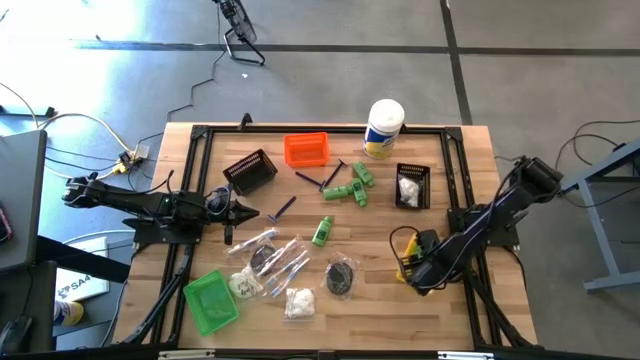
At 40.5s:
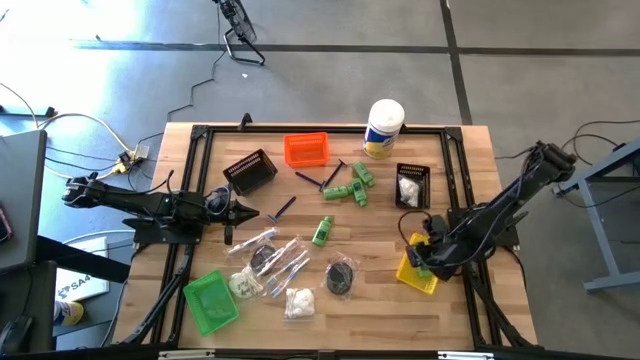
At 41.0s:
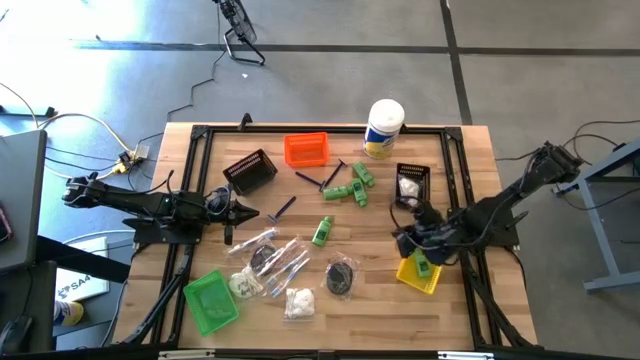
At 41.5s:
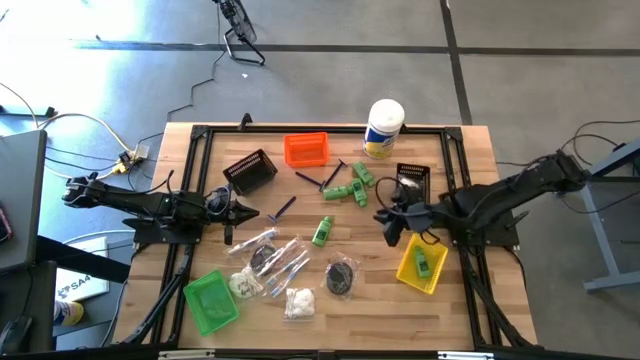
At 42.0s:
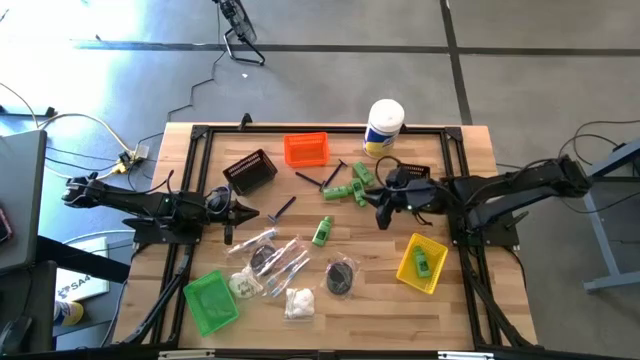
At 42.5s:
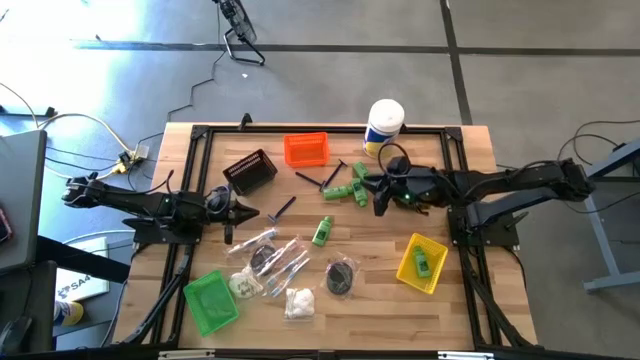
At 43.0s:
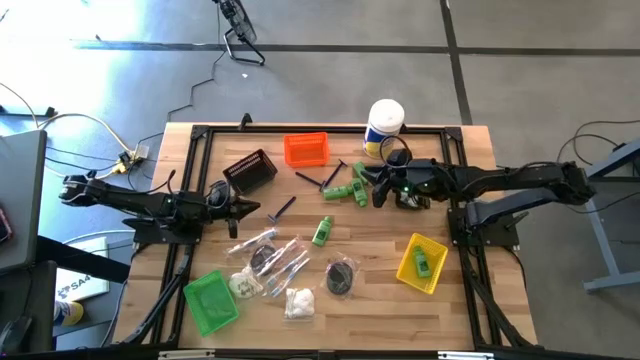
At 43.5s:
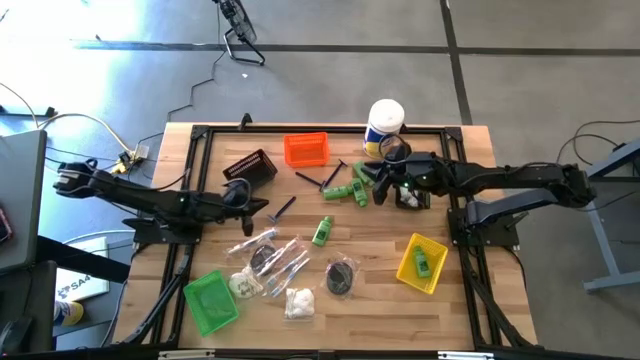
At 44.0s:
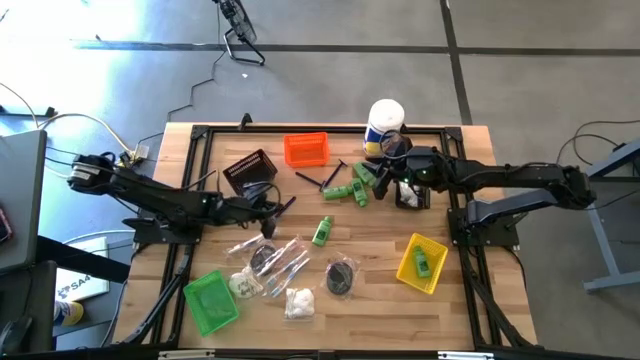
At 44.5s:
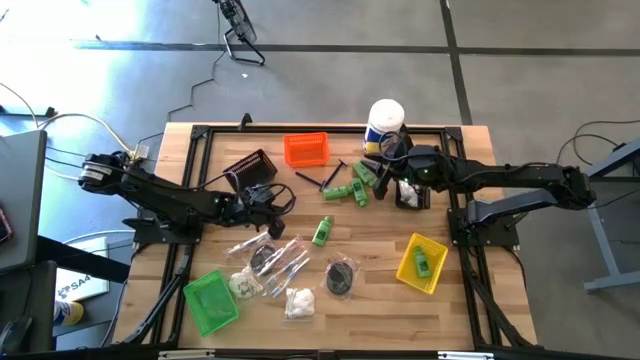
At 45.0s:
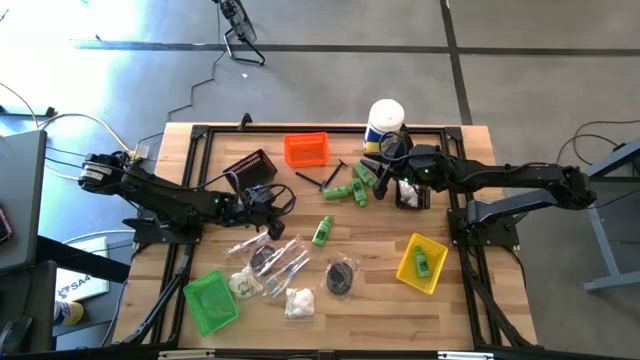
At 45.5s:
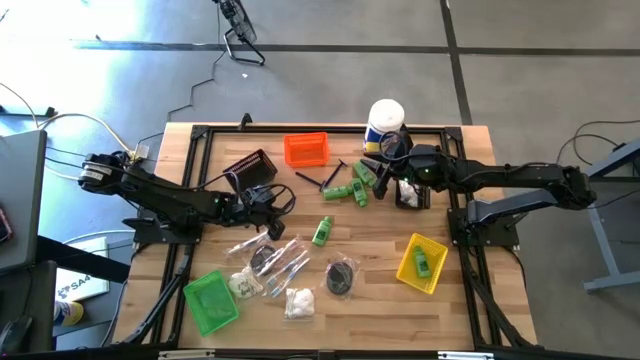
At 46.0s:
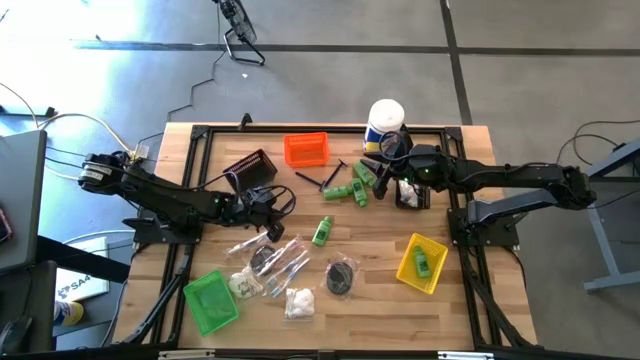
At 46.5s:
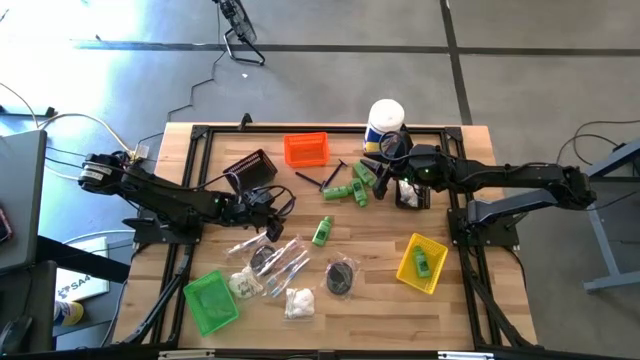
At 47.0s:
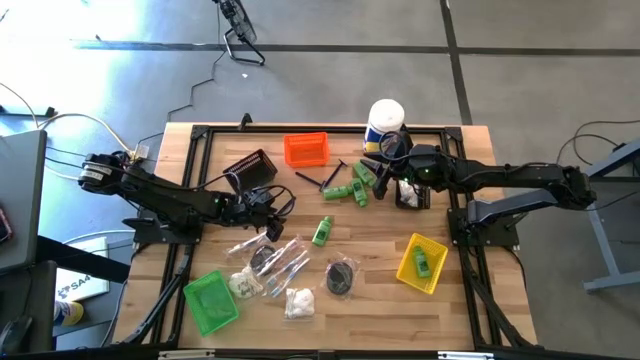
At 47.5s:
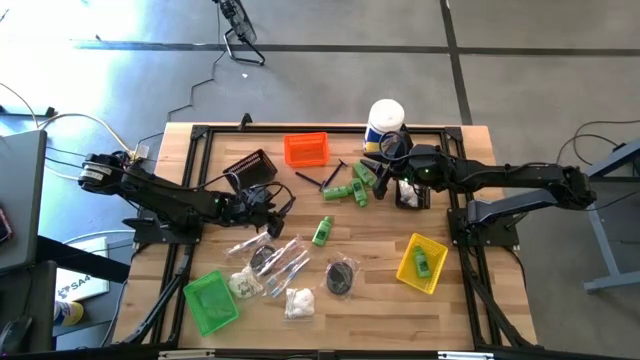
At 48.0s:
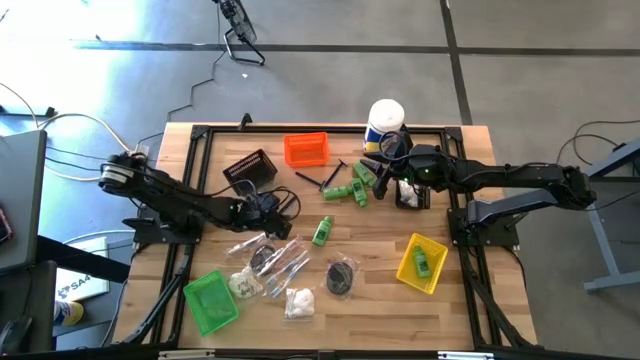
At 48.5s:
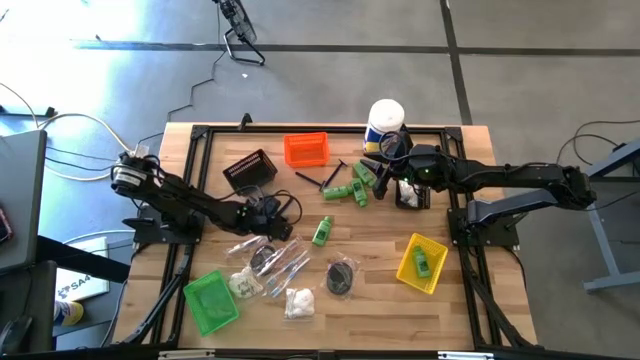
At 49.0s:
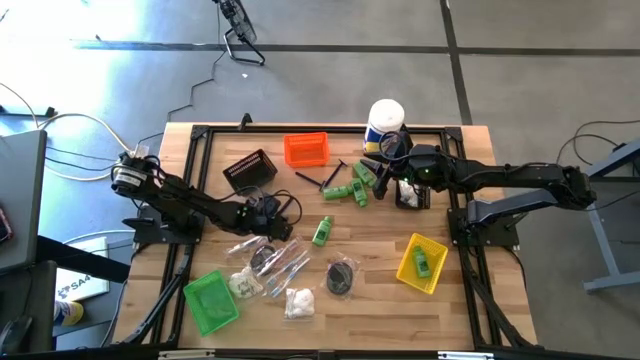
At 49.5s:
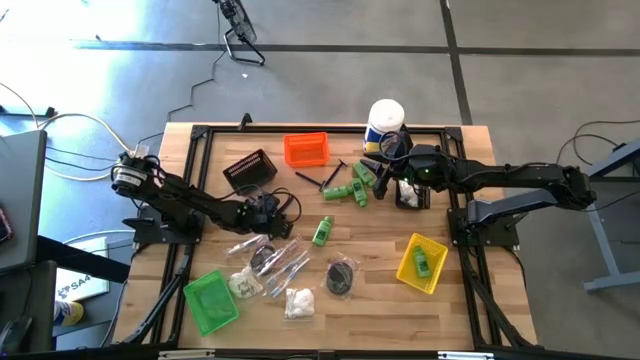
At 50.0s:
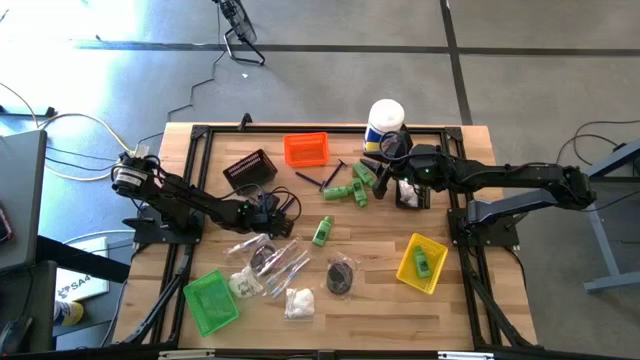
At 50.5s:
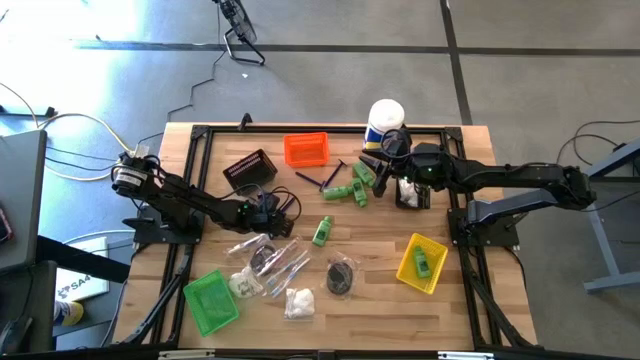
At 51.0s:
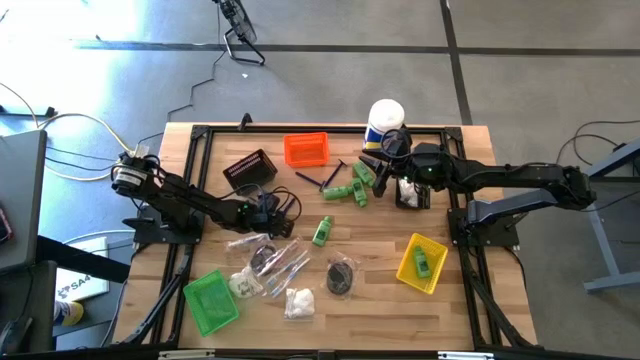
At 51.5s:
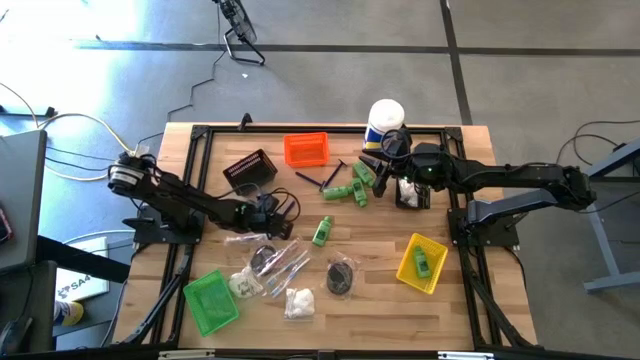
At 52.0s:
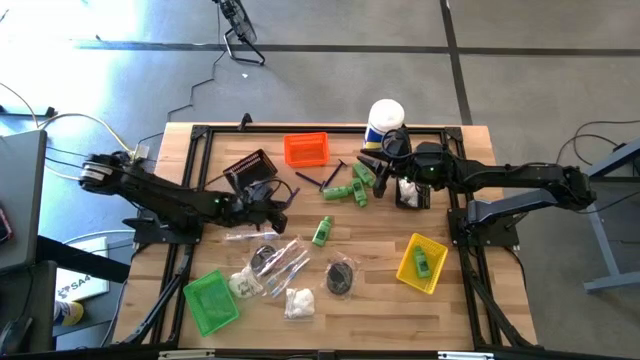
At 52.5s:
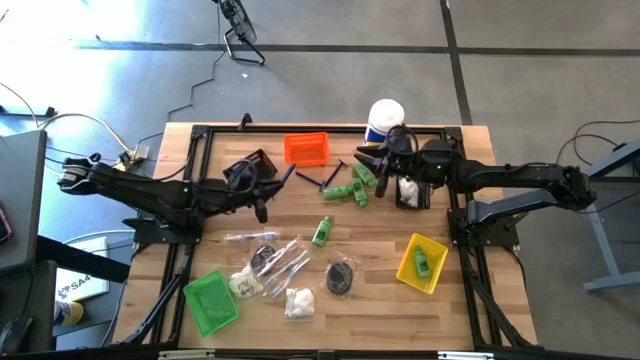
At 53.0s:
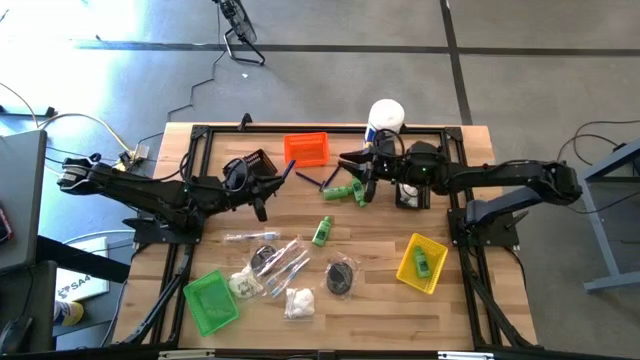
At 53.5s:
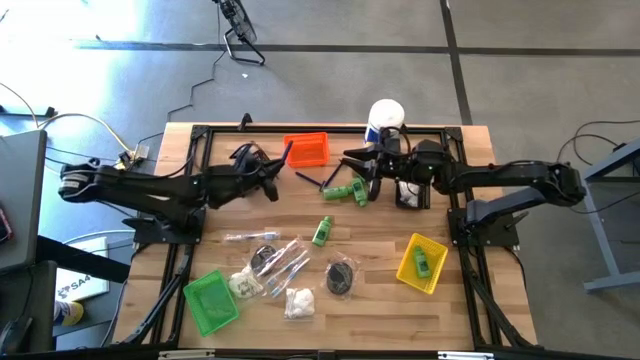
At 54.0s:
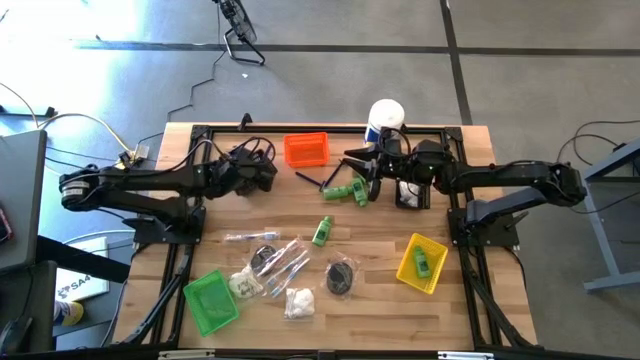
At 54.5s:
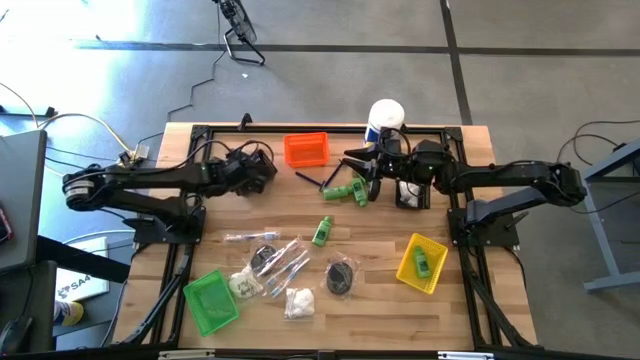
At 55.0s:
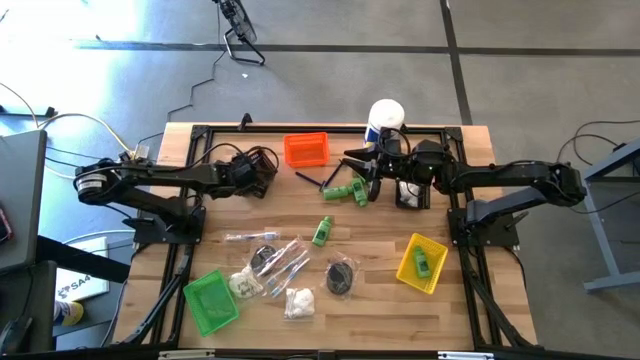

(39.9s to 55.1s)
Task: Pick & Place Travel size toiletries
Put the blue razor into the left black bin

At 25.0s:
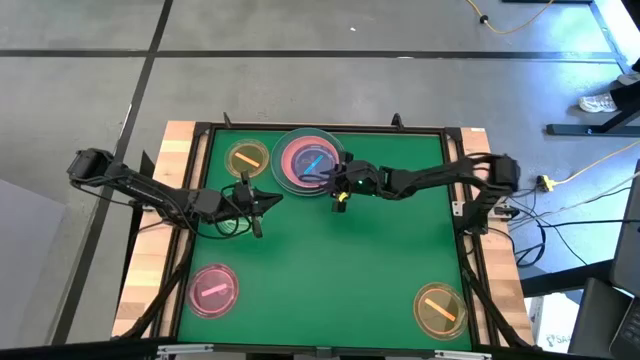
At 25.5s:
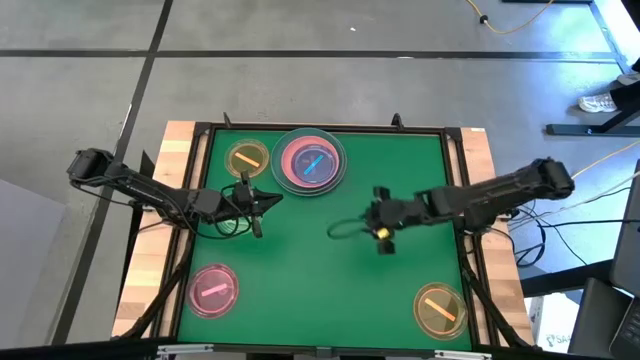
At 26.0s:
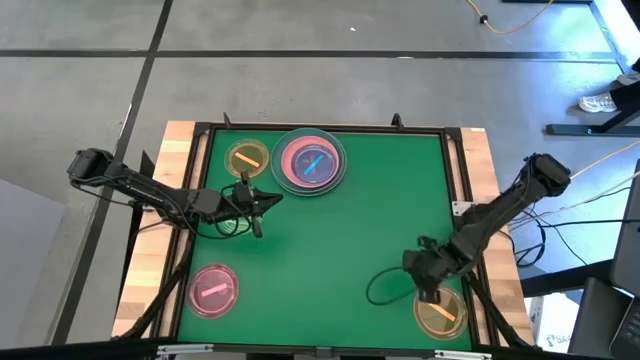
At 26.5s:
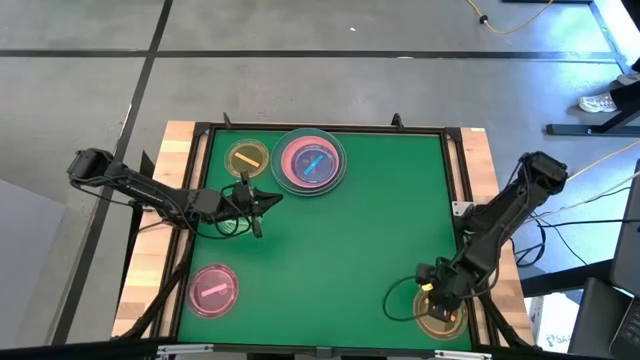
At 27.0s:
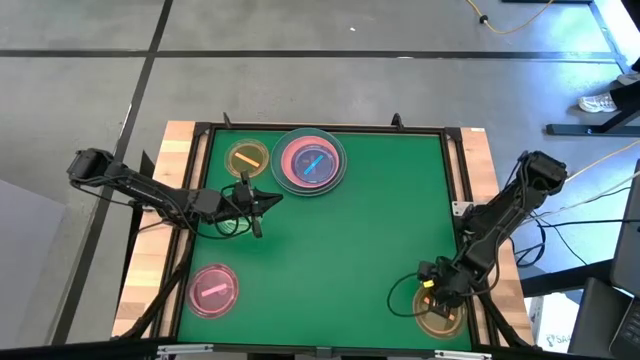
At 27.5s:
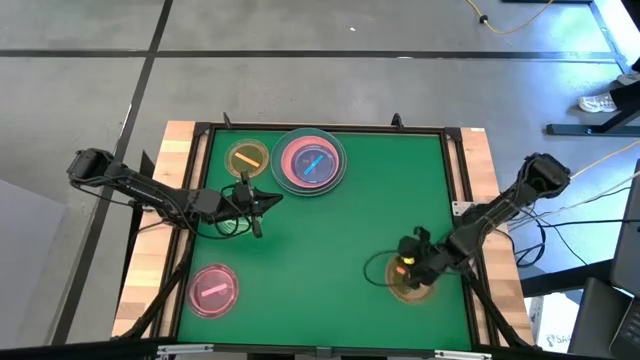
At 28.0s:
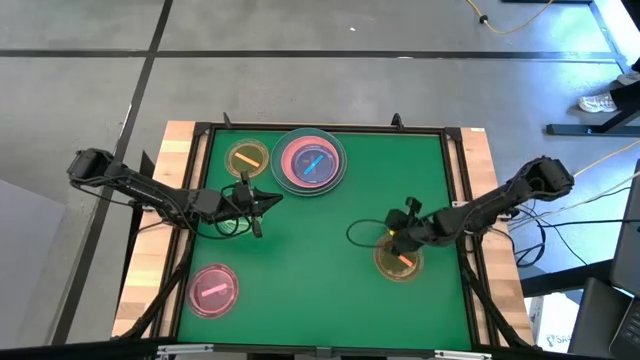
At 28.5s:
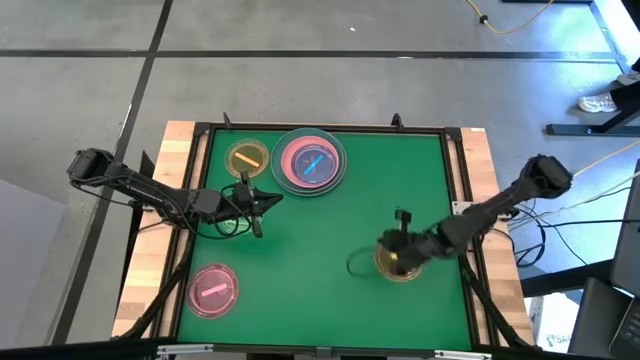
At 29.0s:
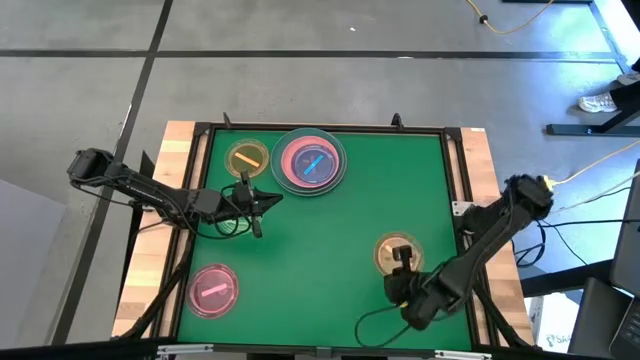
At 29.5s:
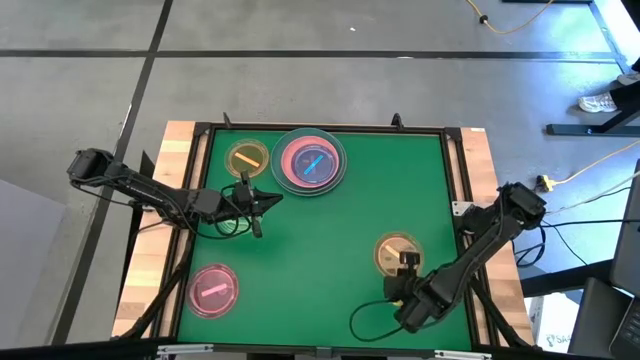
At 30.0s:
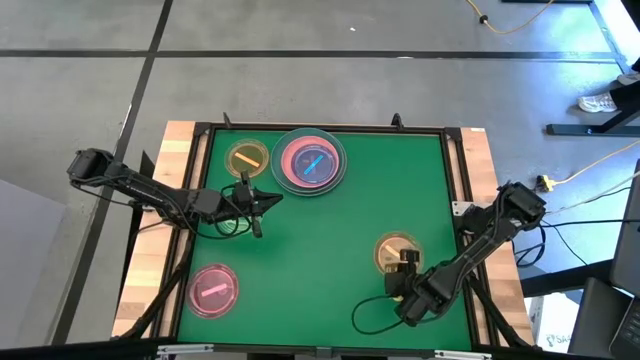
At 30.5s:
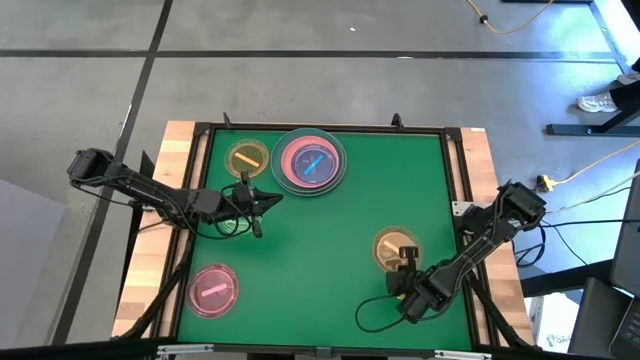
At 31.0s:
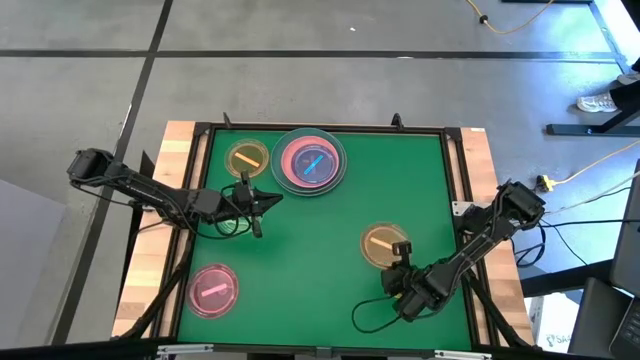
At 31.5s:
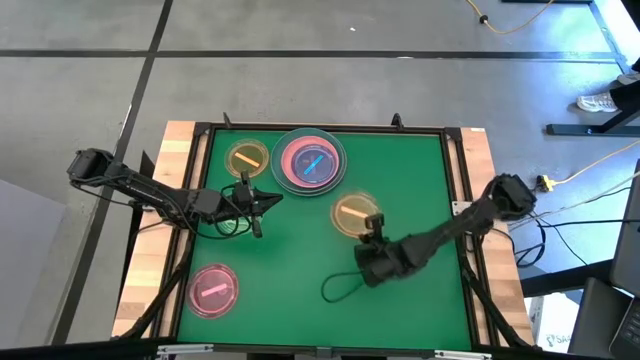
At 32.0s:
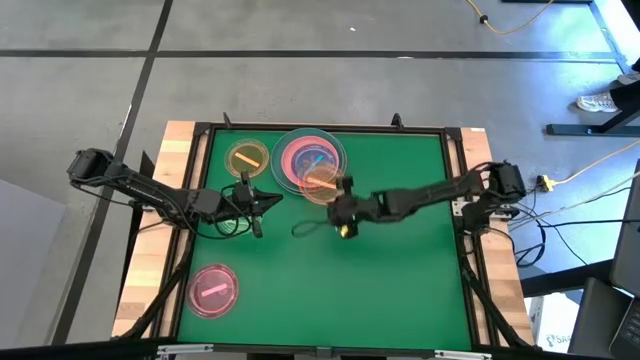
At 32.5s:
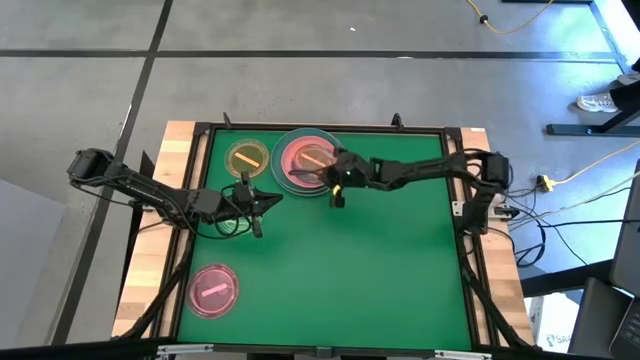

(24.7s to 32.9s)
Task: Stack plastic plates
Stack the bottom orange plate on top of the blue plate
